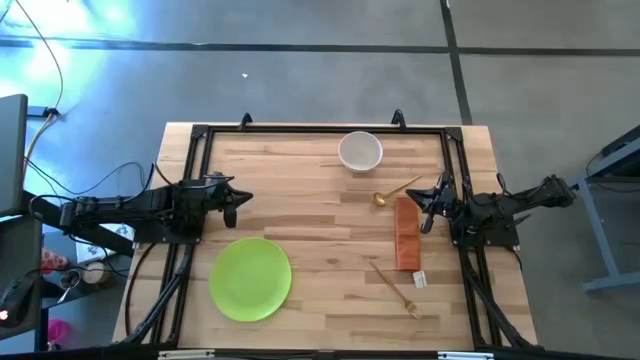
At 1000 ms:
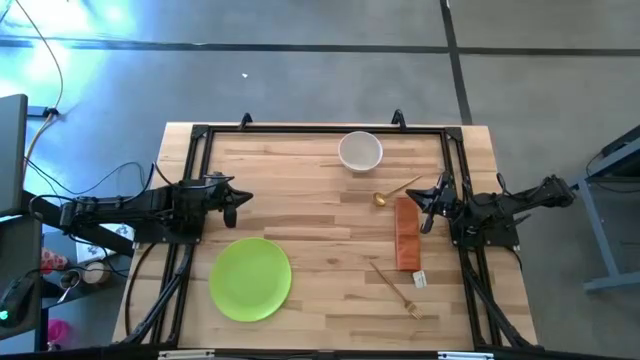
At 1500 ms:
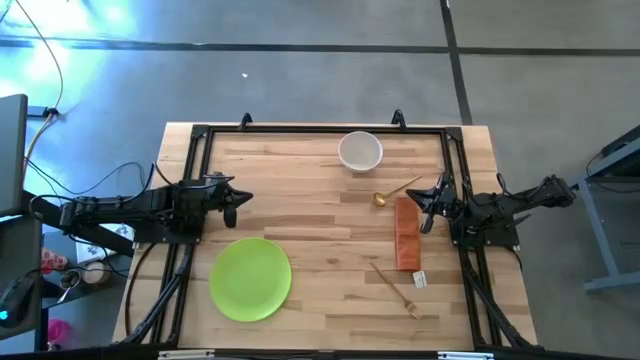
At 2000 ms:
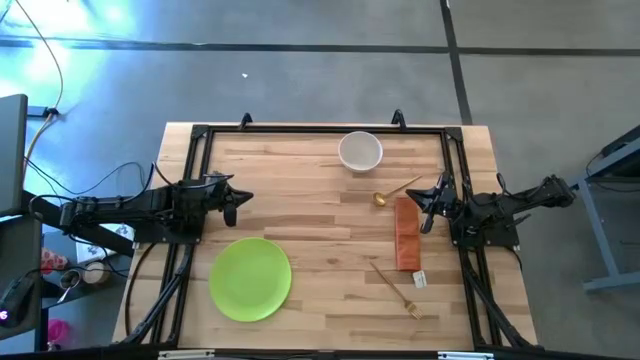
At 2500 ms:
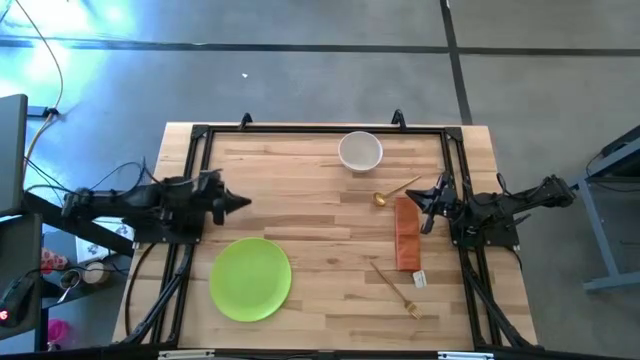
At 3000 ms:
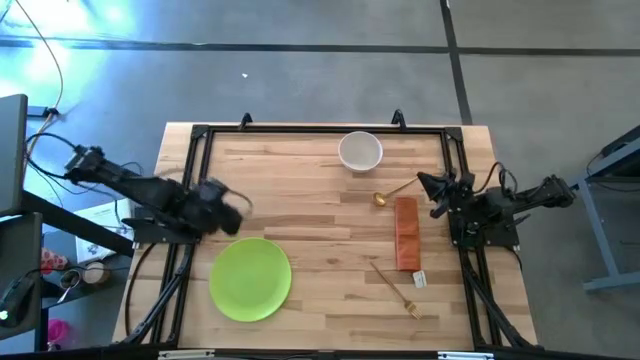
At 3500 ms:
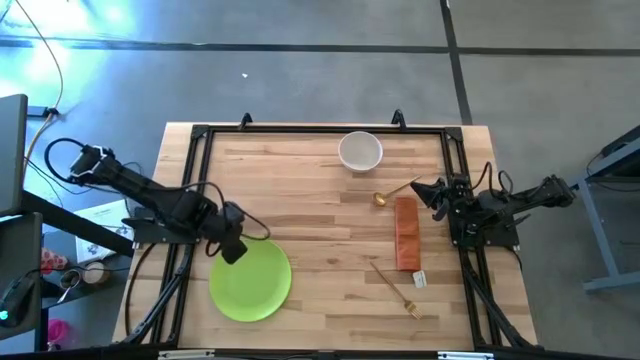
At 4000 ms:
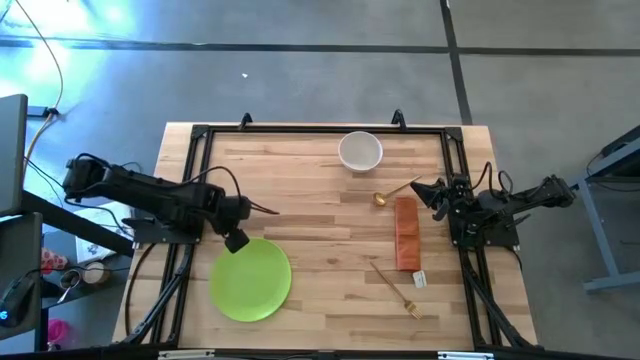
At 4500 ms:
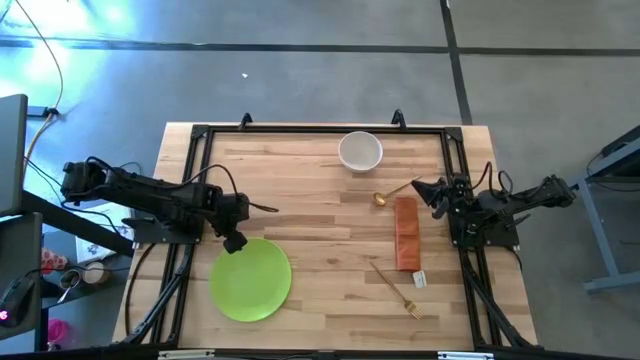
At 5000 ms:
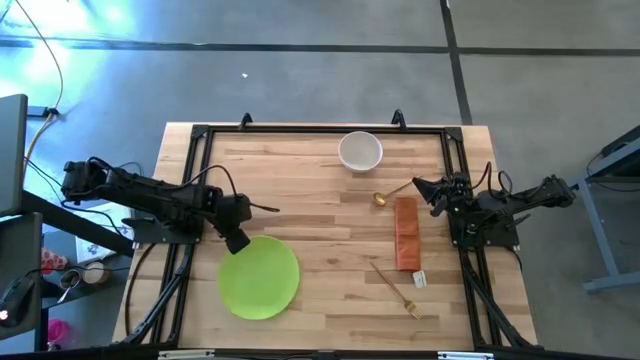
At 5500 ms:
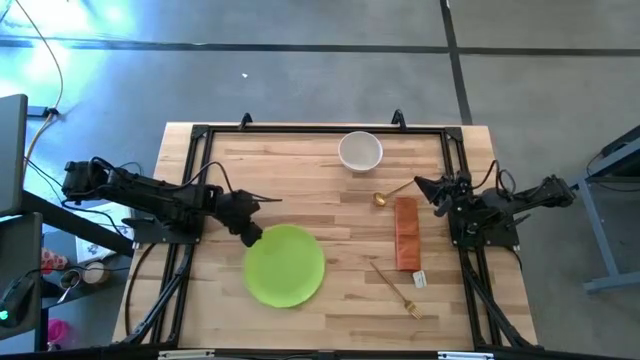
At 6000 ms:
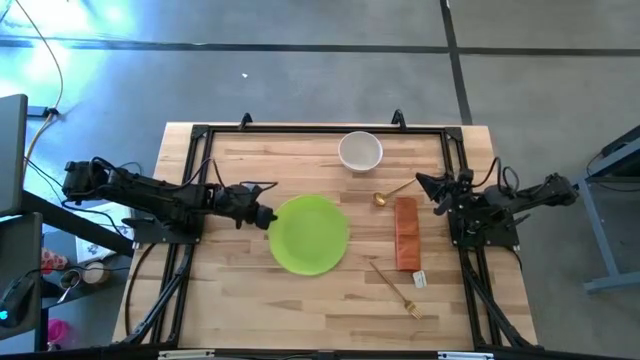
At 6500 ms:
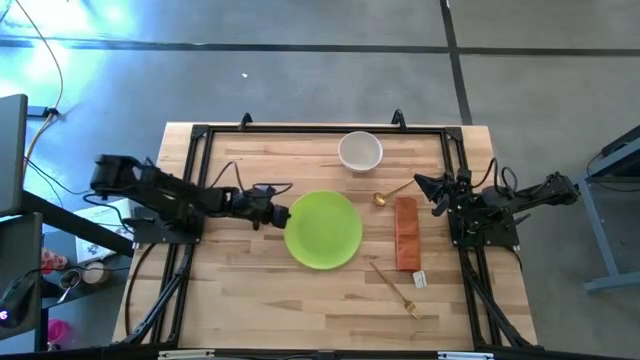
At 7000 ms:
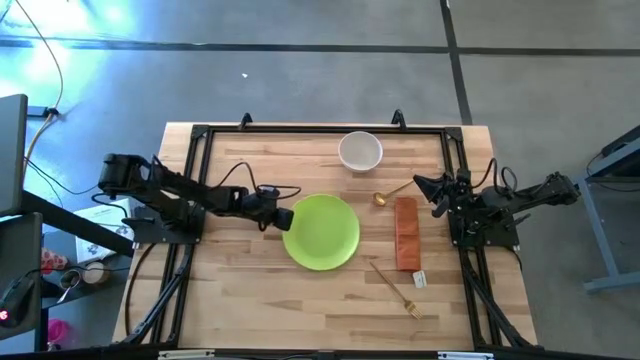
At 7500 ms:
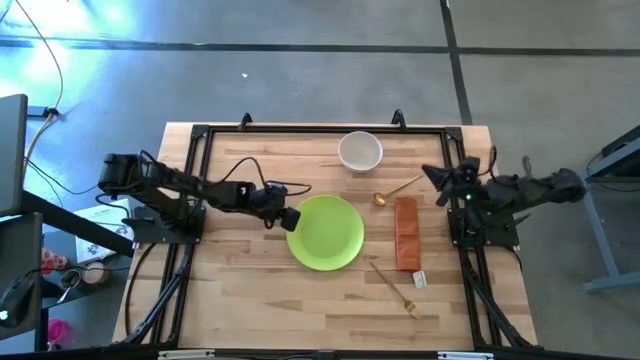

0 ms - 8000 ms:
Task: Set table place
Place the green plate in the center of the workspace

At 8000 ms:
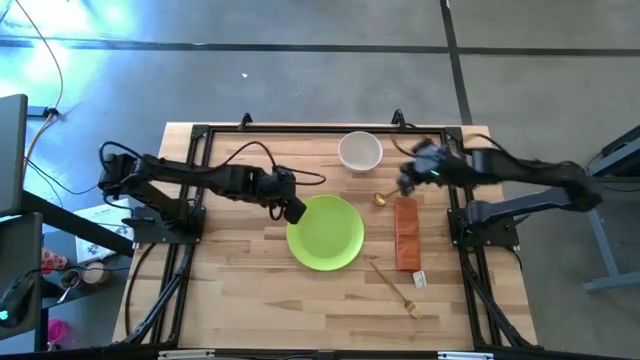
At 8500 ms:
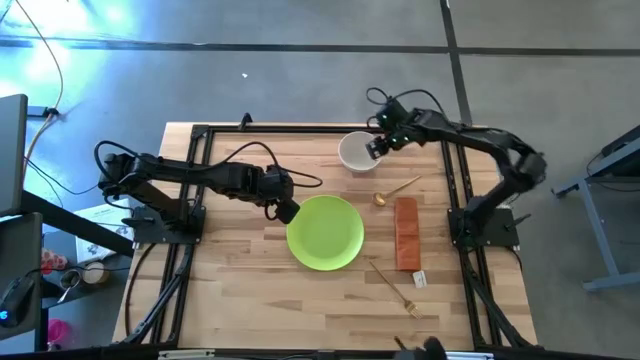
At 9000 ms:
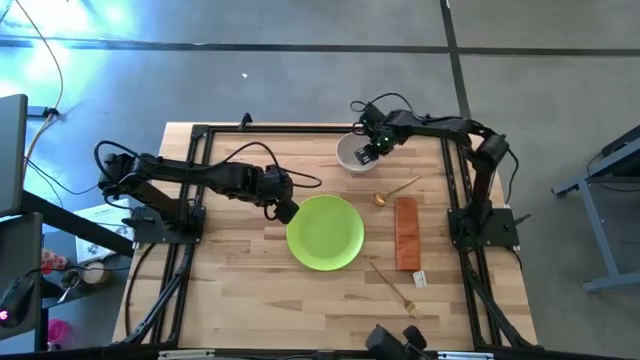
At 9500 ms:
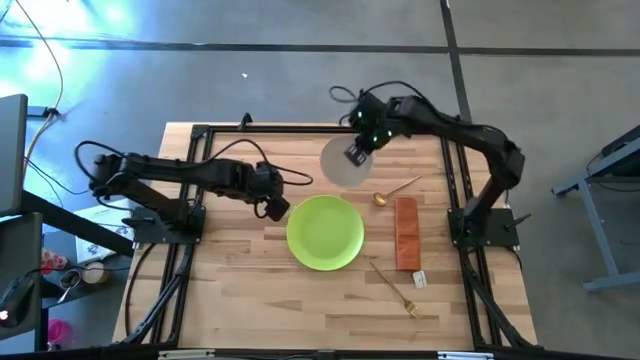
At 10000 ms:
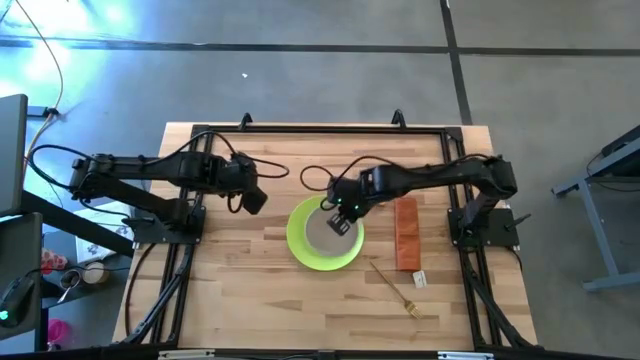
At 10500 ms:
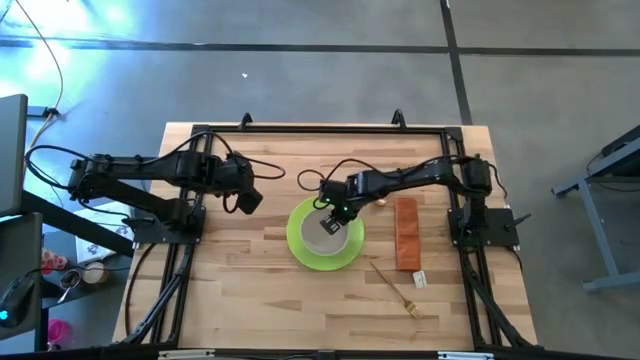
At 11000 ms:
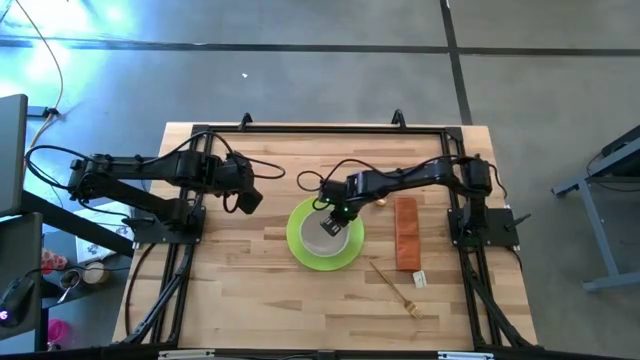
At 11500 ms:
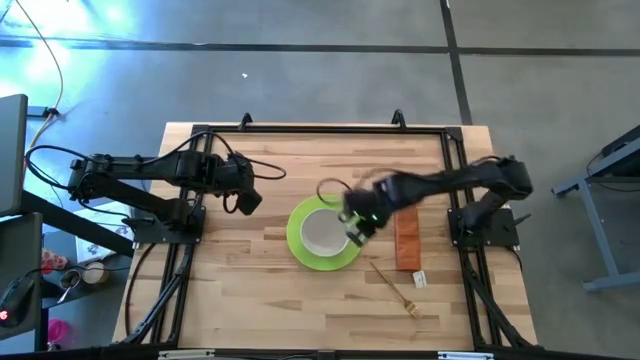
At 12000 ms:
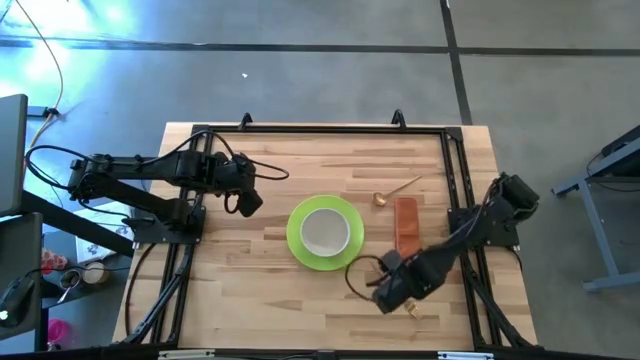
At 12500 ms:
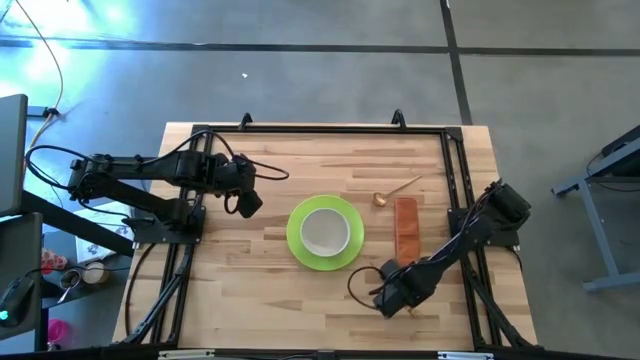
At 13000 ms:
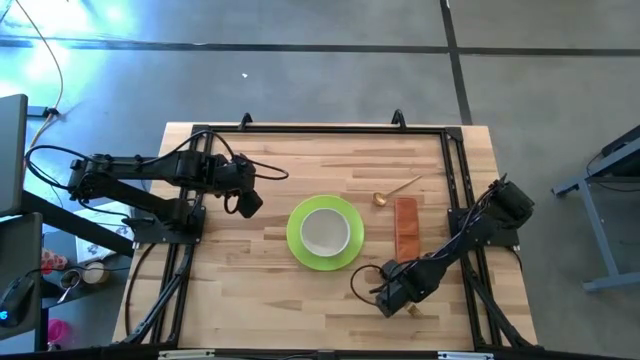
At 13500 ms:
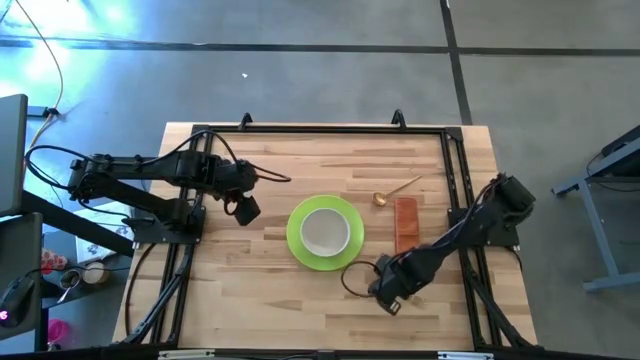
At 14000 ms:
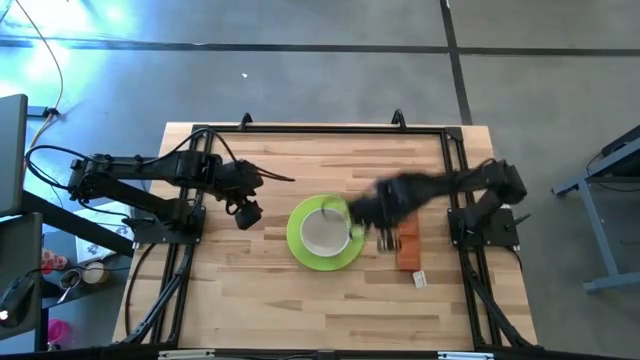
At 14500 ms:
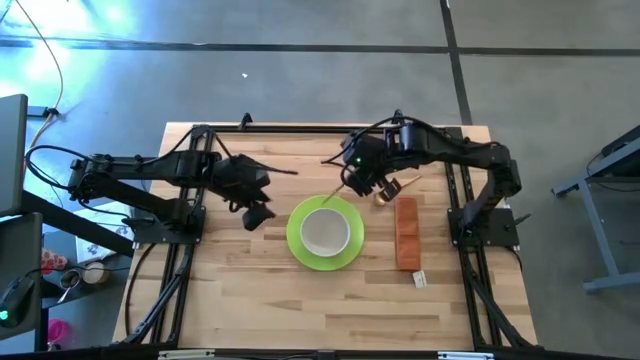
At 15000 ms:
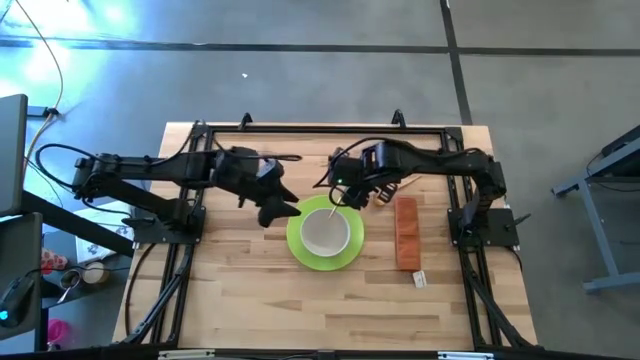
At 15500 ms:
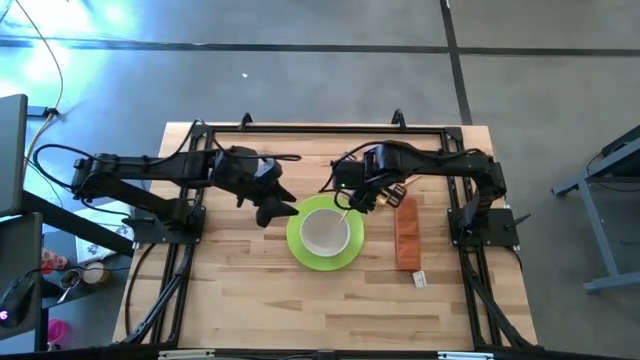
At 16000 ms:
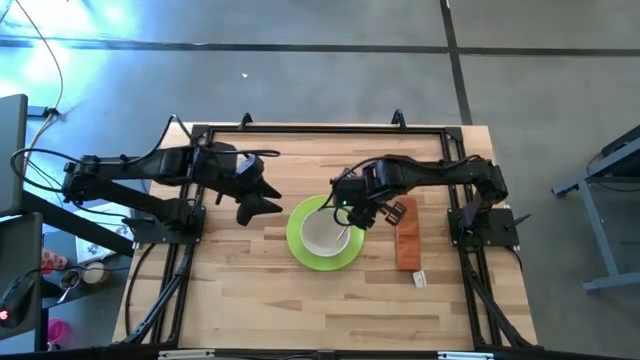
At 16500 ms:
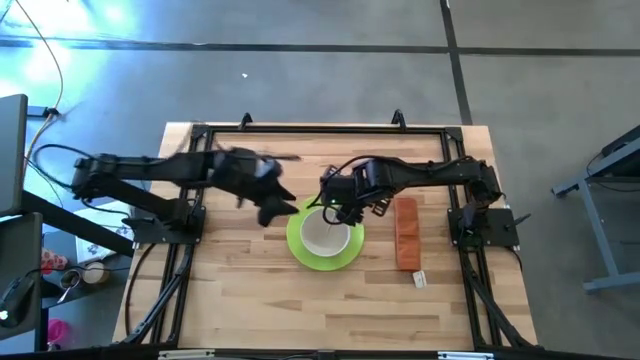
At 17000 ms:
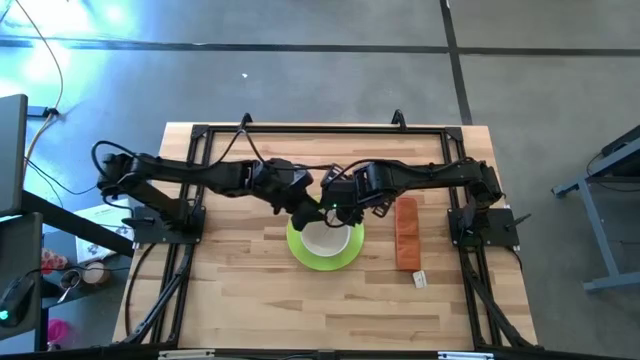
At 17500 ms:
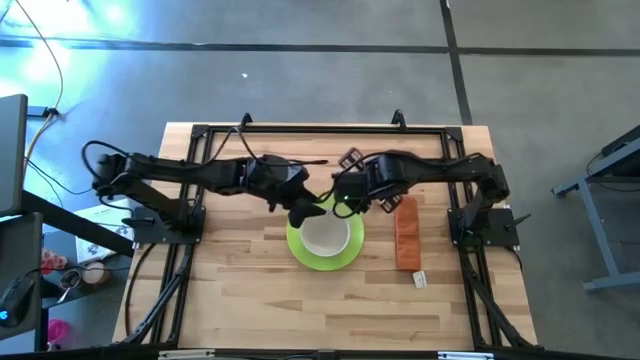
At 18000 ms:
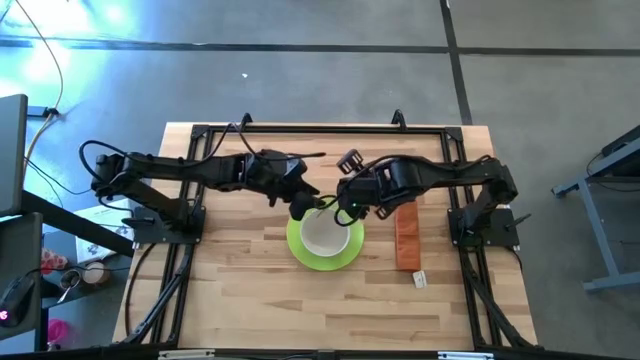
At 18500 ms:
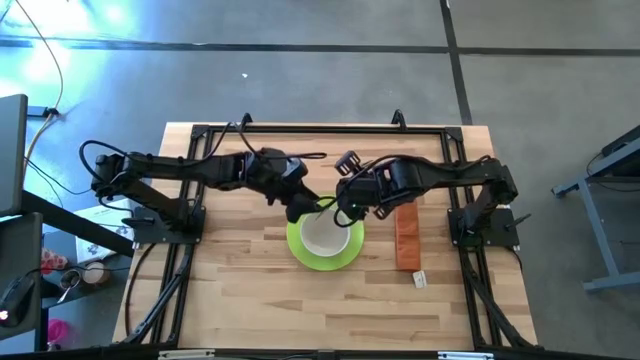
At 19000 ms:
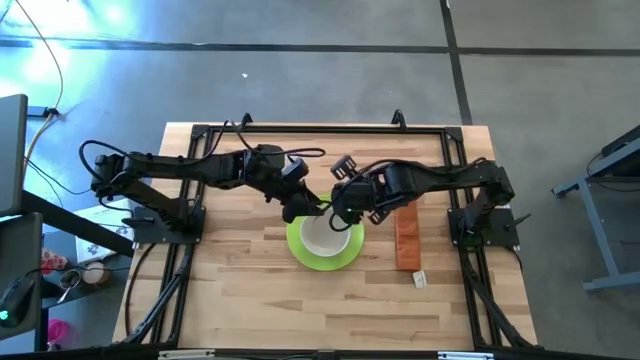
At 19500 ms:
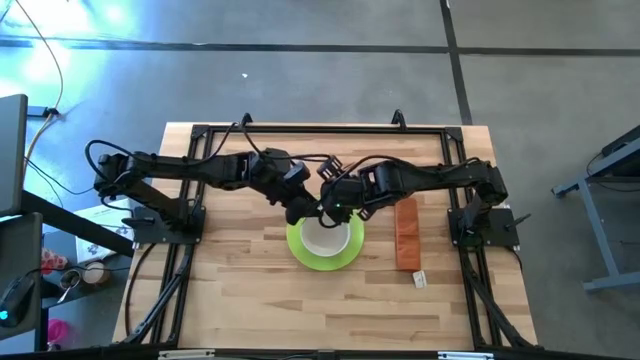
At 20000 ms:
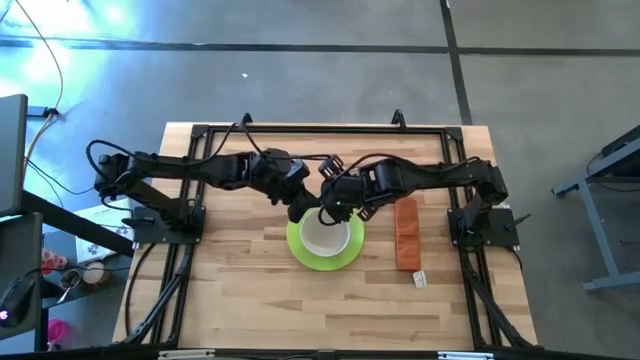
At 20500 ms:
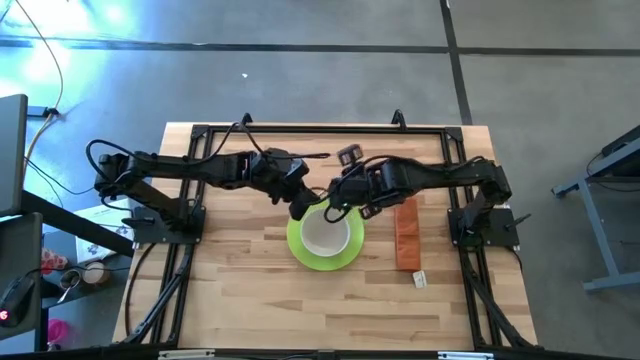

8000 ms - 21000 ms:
Stack the white bowl on top of the green plate

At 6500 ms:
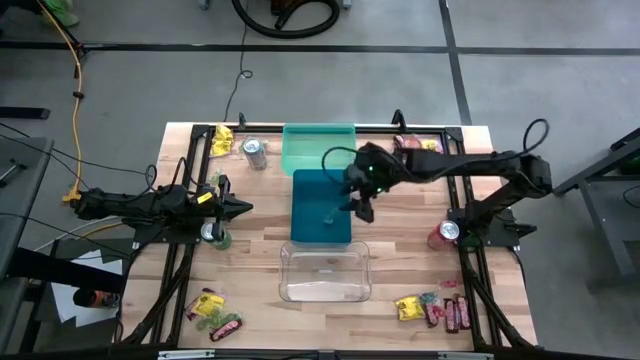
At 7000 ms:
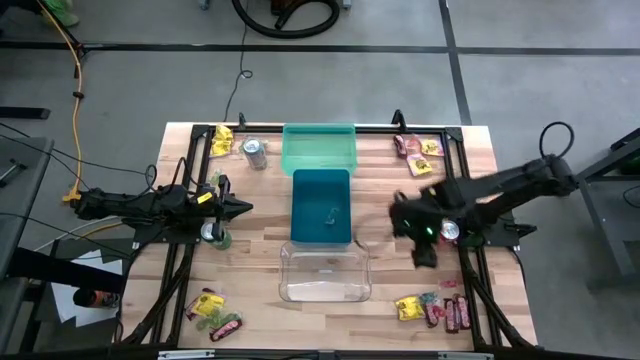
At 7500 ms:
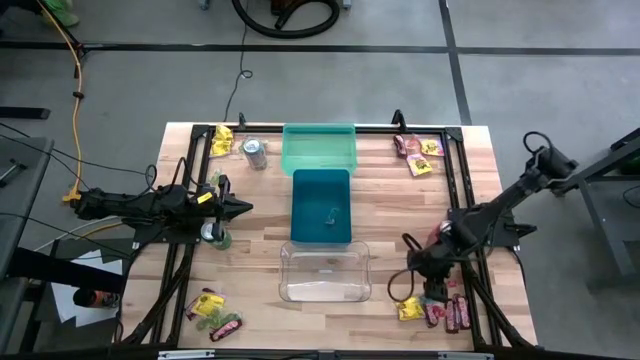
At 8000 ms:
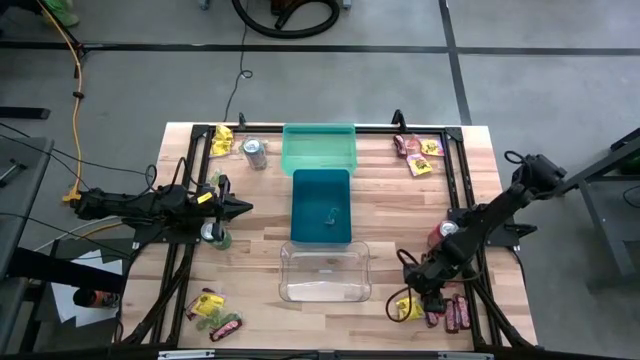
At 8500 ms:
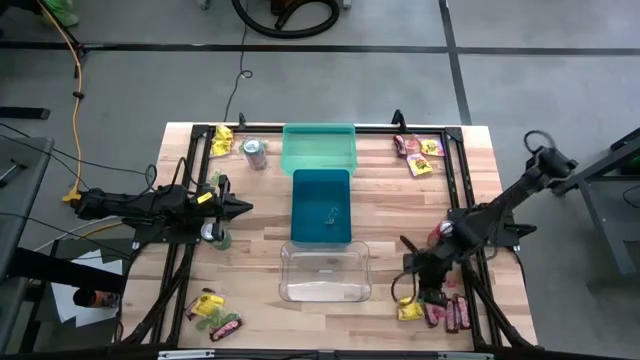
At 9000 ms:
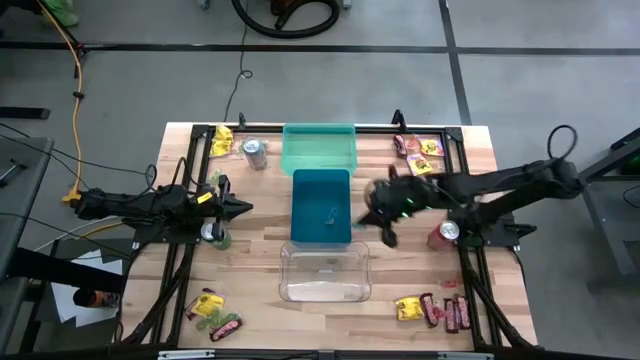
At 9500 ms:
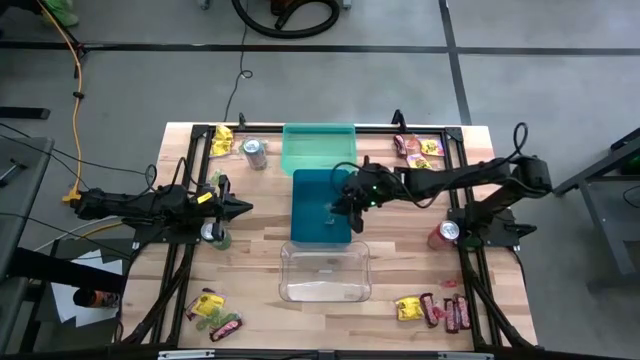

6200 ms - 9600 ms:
Task: Sort candy
Put the blue candy into the blue bin
